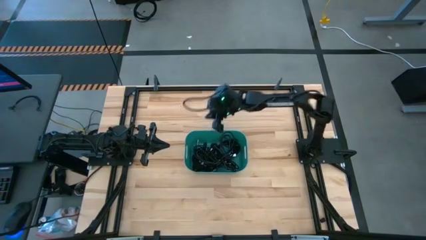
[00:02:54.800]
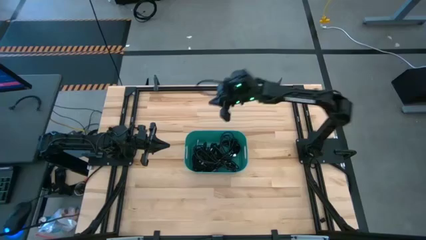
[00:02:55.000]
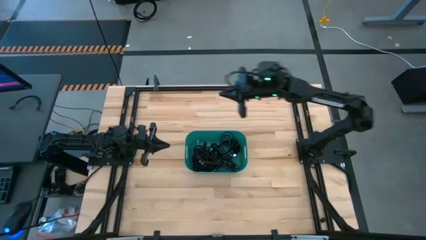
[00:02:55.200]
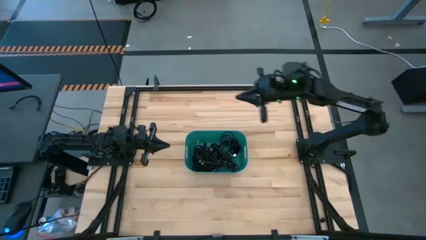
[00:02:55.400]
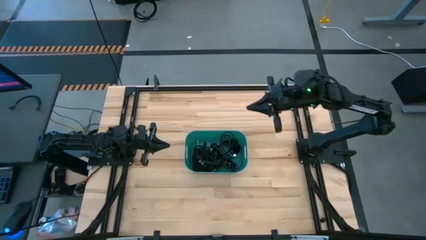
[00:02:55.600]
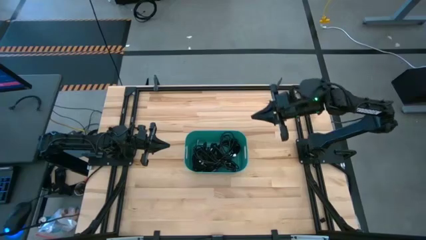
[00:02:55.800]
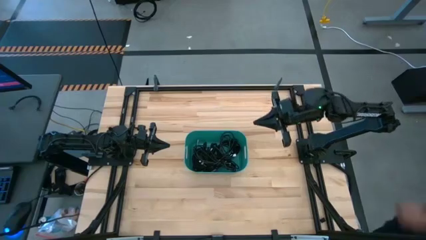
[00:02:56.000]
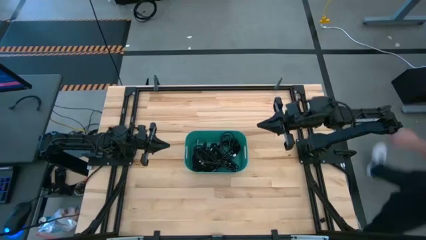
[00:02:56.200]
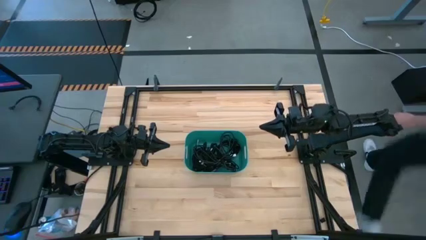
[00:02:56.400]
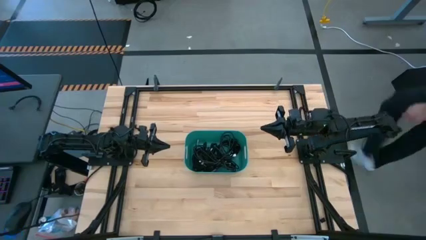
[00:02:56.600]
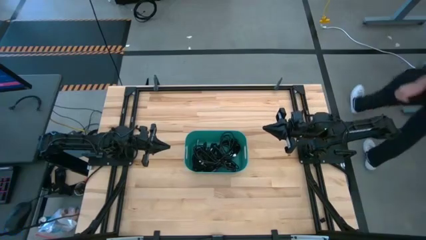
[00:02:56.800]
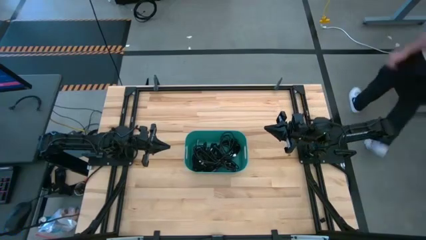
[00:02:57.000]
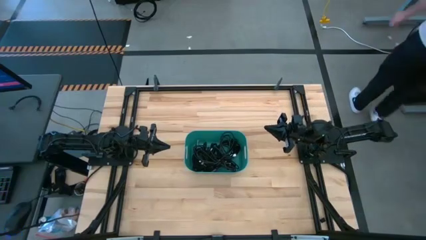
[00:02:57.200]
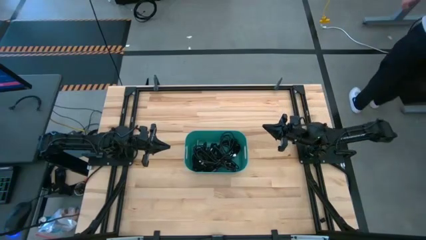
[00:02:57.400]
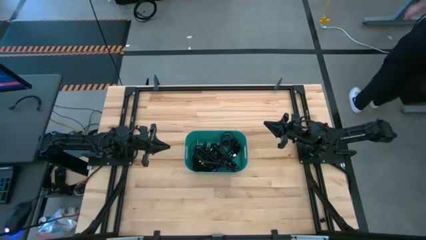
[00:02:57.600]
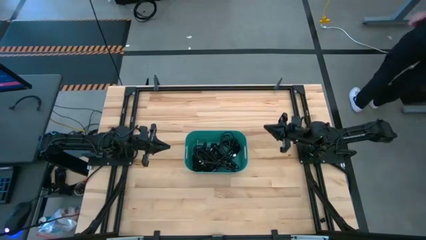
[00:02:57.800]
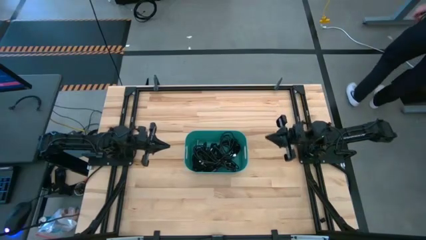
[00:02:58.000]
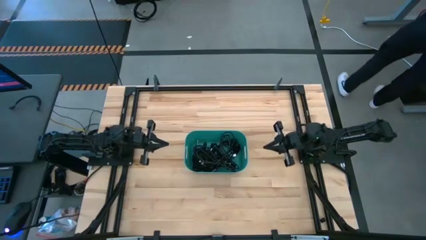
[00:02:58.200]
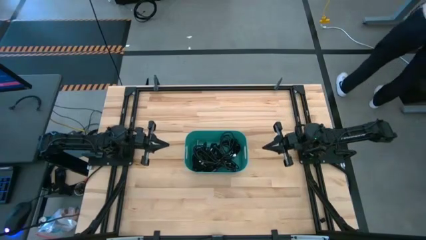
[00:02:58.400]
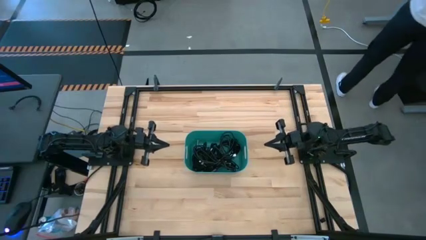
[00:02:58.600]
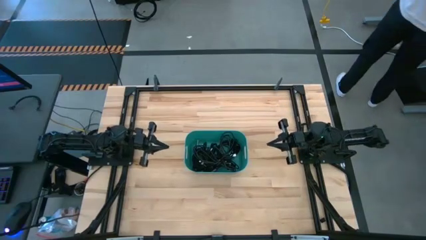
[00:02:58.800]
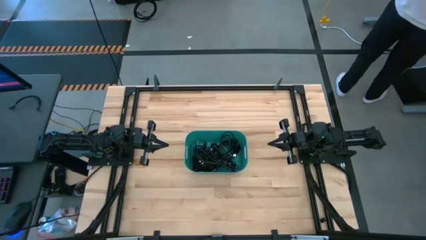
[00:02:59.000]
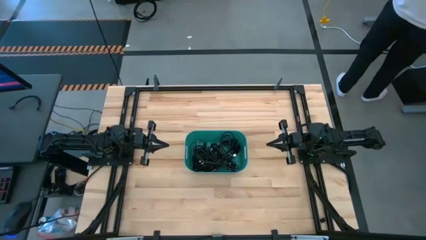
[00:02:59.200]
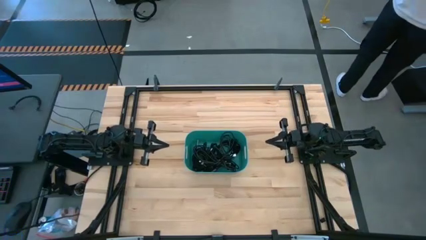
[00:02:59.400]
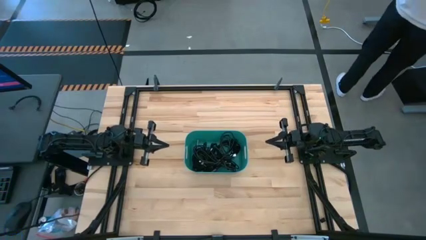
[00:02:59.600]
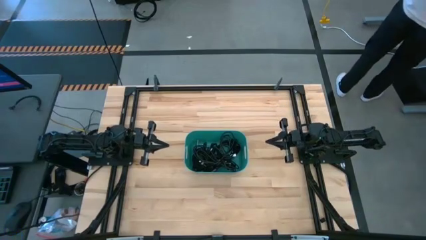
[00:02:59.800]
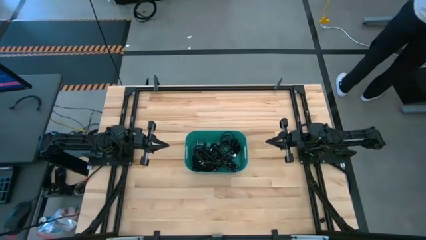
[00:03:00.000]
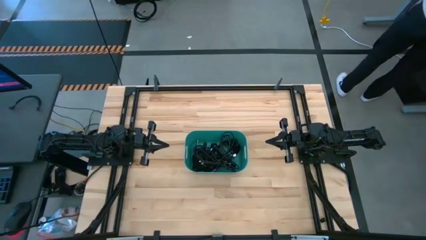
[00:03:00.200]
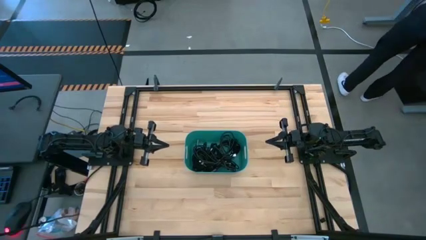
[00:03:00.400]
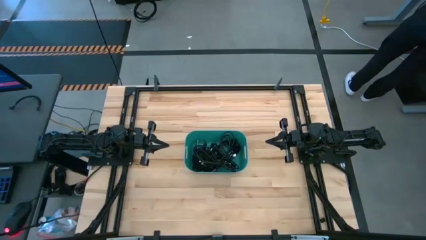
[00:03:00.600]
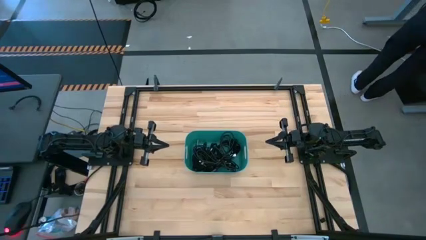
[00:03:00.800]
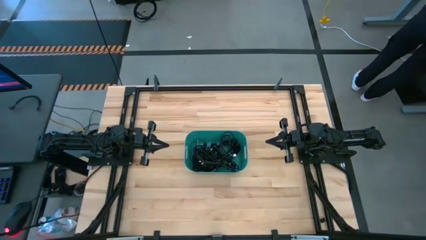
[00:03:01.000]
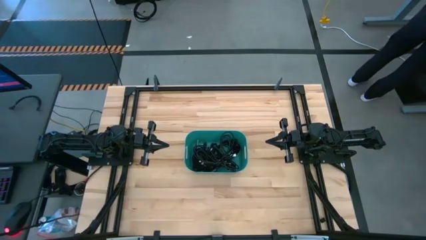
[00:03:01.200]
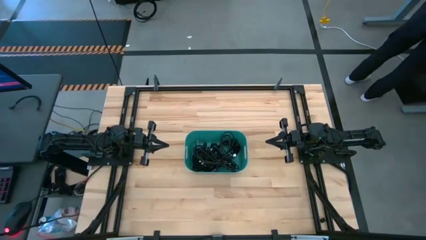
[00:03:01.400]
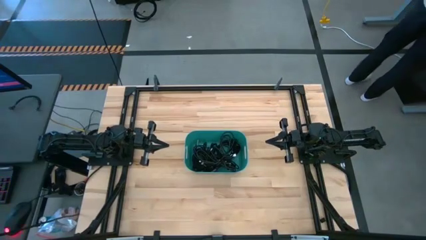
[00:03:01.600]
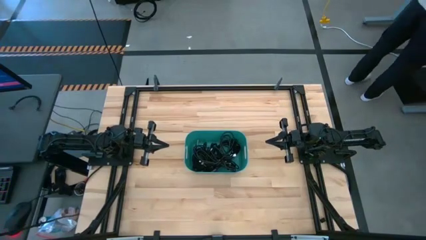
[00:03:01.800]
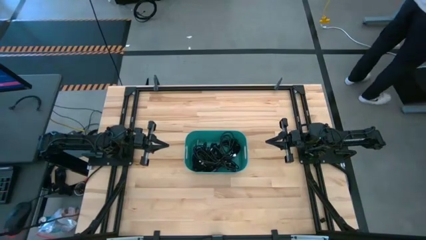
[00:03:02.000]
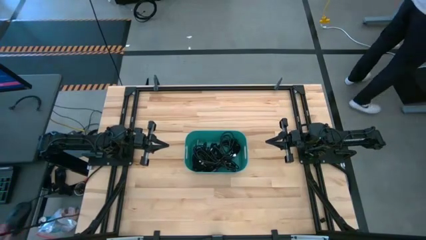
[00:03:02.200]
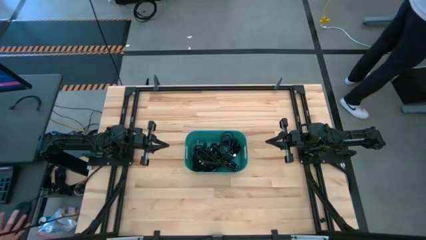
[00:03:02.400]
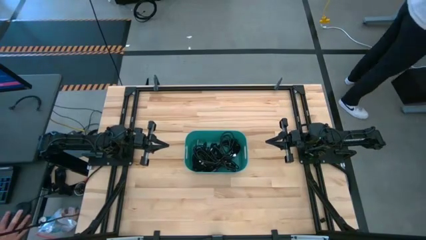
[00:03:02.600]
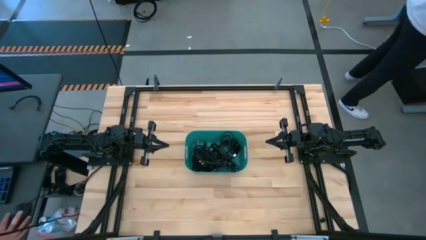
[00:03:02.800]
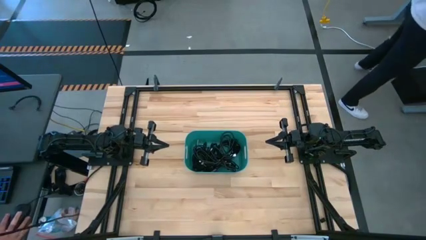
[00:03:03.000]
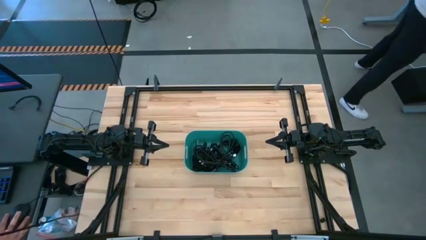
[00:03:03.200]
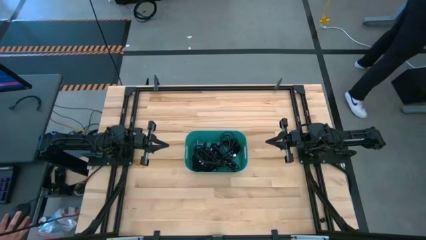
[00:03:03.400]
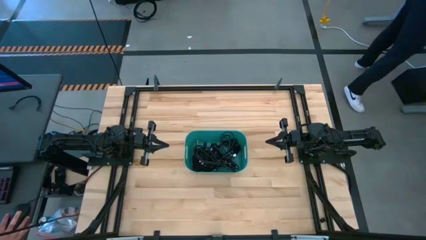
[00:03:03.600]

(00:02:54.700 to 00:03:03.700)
Task: Pick and place USB-C Cables
Return to Home Position

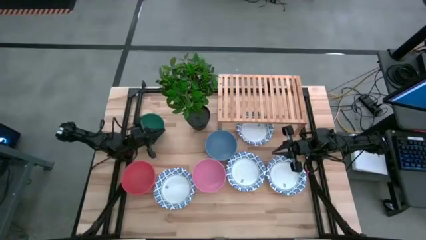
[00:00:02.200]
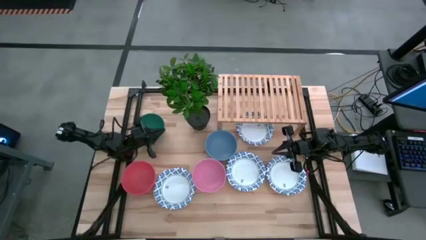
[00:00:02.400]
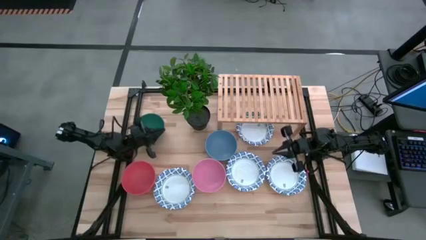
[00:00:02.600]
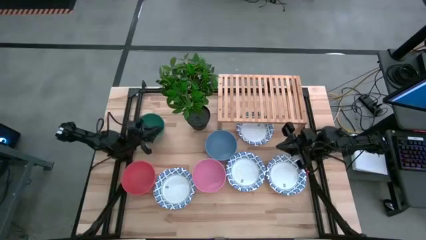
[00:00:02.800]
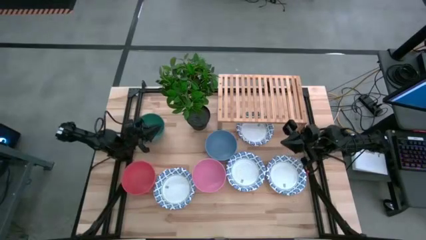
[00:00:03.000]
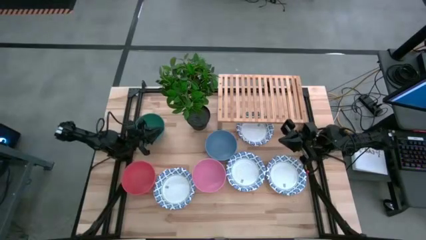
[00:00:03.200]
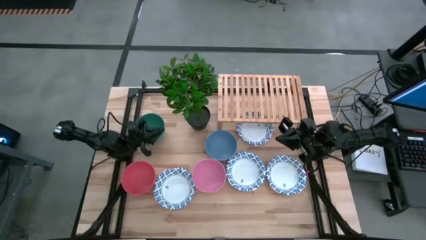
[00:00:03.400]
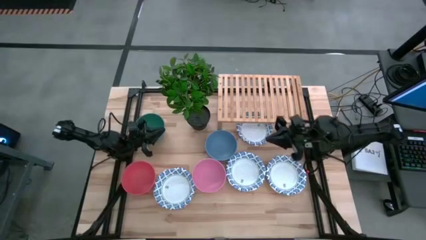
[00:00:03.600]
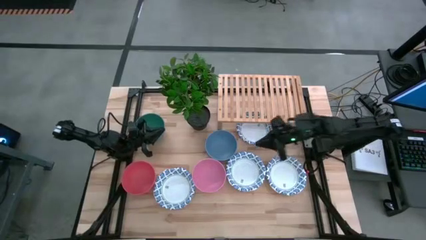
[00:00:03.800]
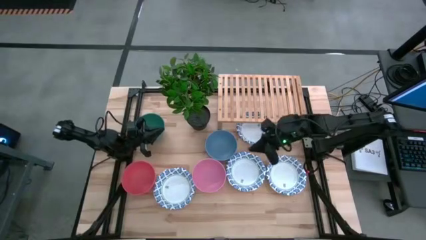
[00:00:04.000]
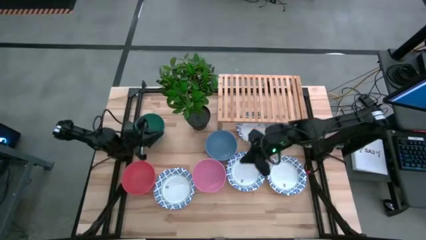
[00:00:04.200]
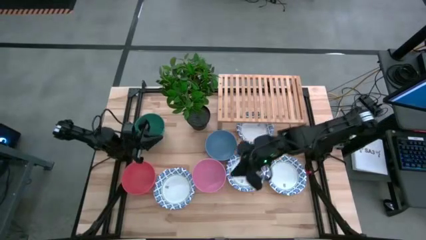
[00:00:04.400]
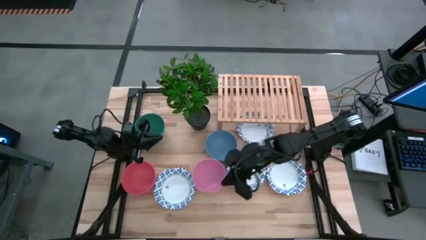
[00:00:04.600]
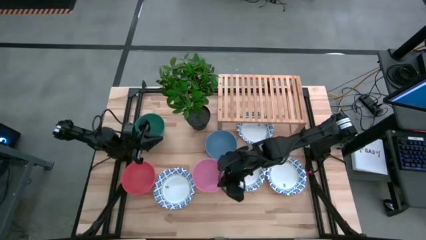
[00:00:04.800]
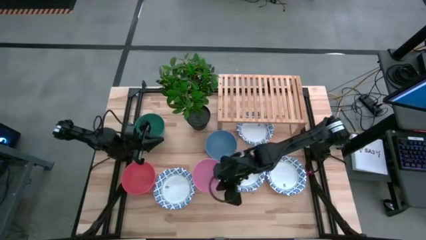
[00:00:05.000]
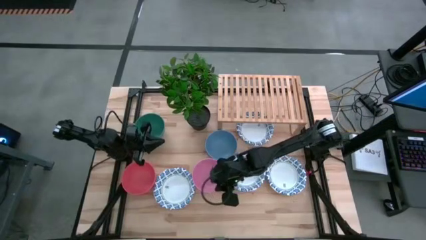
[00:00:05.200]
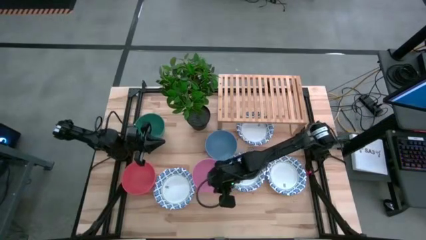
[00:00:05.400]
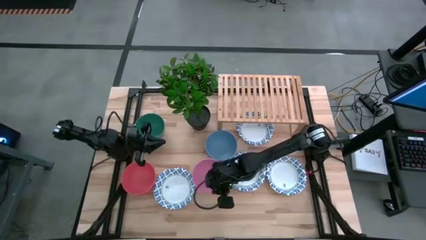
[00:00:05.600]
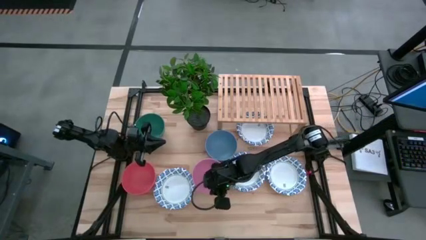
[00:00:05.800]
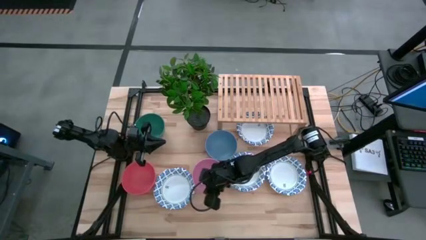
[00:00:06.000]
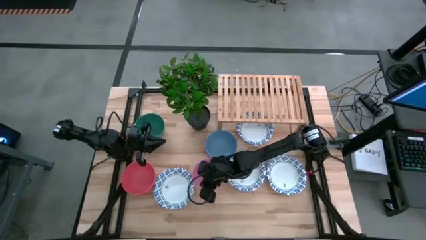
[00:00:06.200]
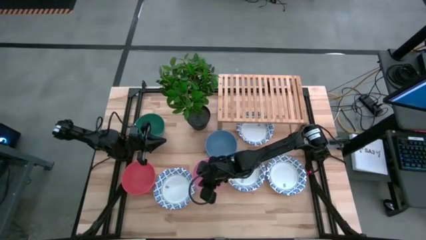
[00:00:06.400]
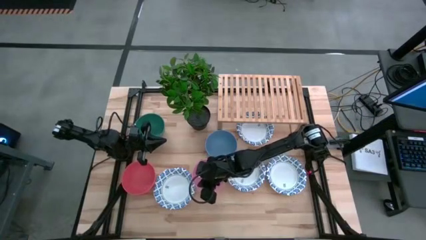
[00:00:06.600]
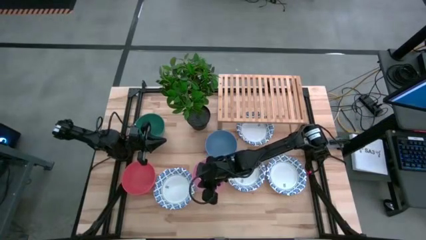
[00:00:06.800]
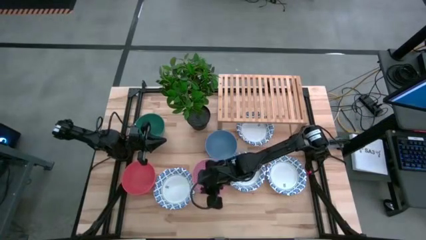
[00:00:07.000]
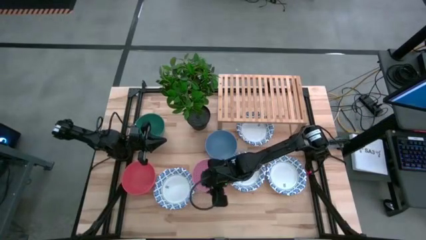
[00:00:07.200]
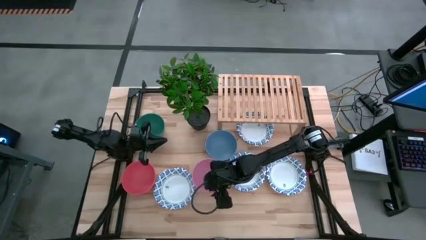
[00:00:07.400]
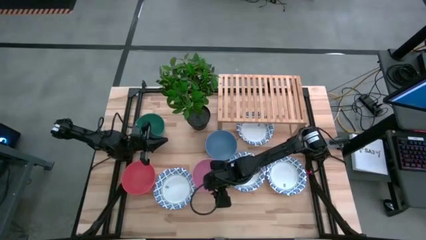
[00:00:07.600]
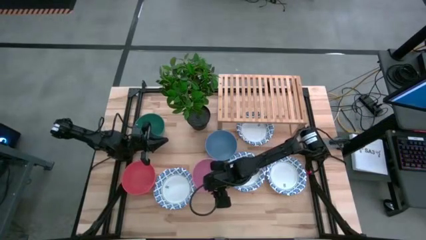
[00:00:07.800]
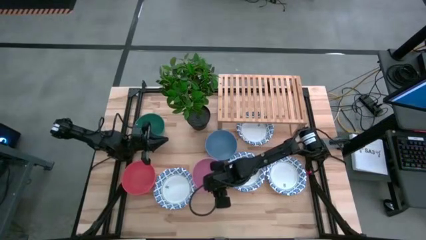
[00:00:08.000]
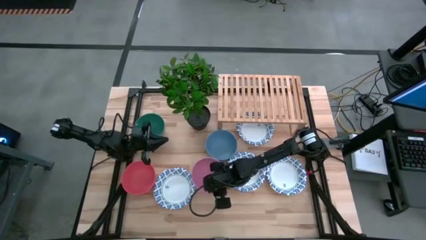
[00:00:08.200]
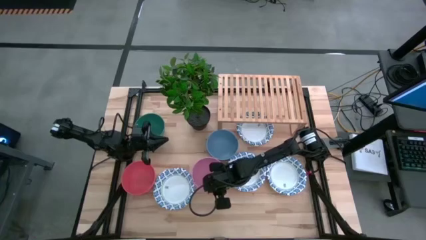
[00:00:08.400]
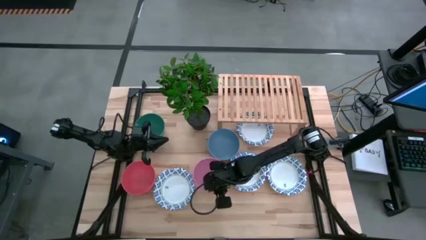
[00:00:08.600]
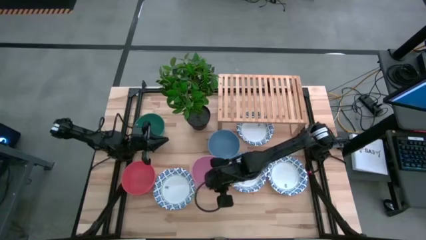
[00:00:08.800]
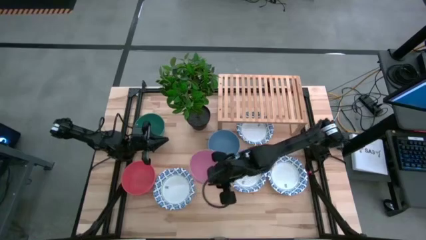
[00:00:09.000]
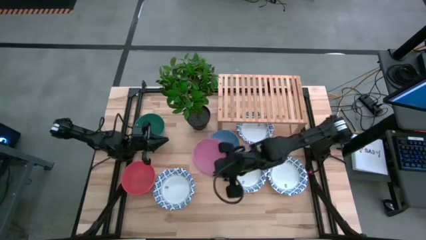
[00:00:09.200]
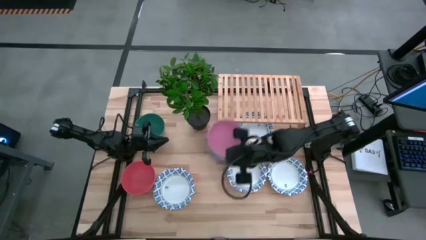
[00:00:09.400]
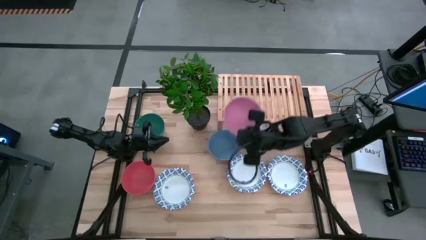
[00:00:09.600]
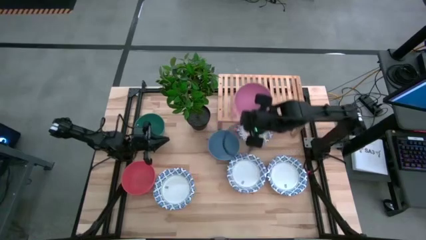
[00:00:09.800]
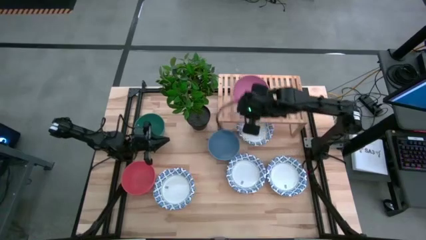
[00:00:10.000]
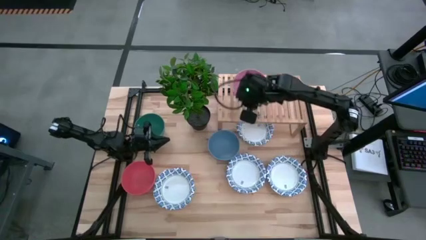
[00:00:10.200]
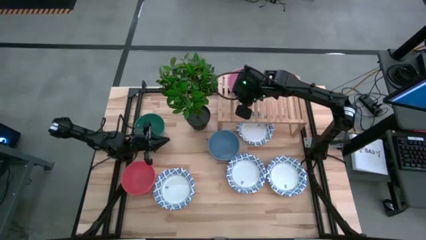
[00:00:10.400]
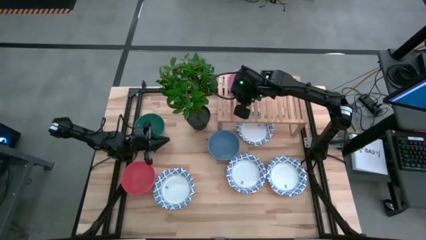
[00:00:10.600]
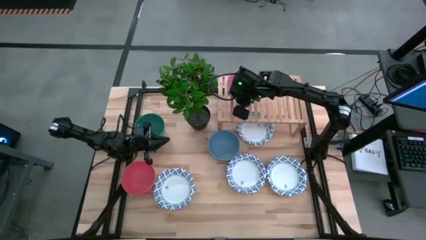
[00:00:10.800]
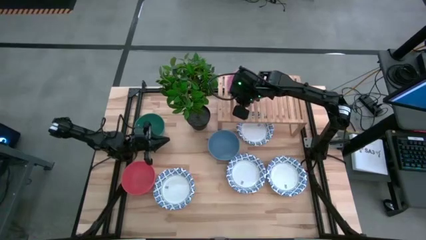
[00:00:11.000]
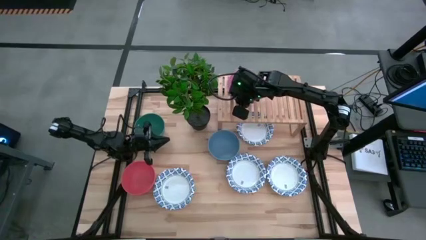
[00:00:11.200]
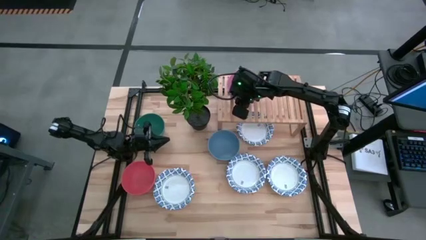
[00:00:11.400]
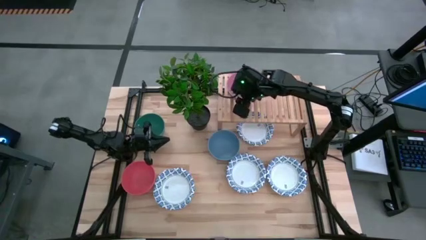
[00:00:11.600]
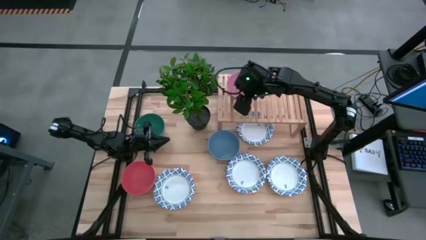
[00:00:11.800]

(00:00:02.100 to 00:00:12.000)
Task: Place and stack bowls onto a shelf
Put the pink bowl on the shelf
